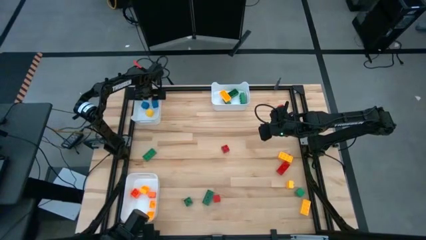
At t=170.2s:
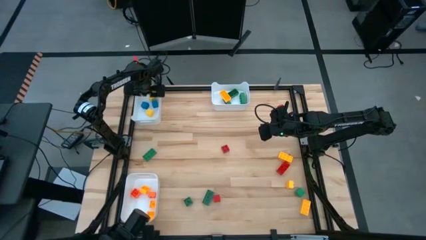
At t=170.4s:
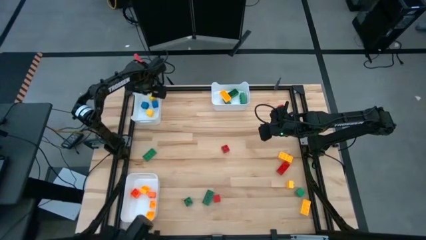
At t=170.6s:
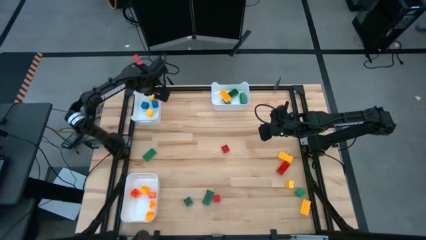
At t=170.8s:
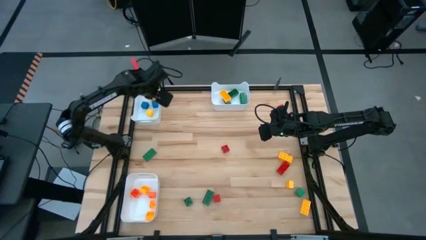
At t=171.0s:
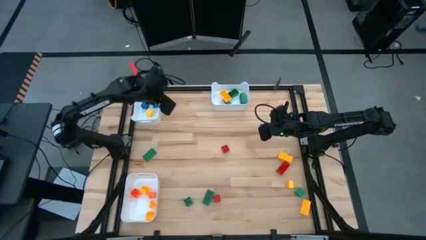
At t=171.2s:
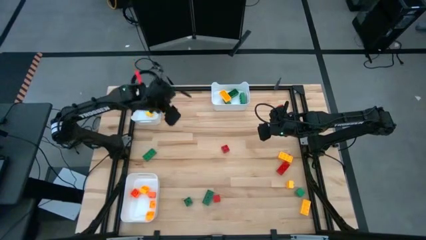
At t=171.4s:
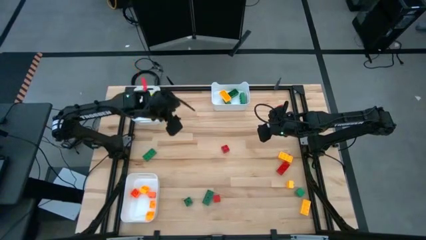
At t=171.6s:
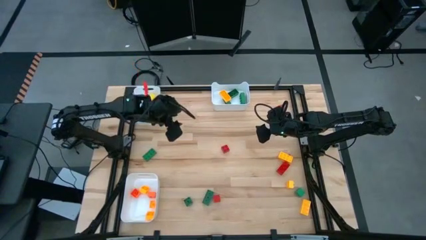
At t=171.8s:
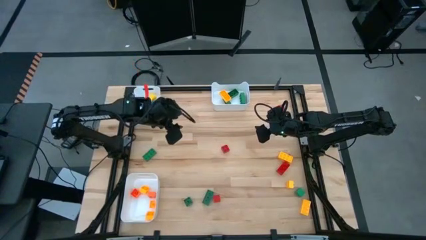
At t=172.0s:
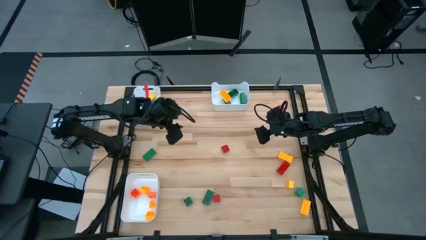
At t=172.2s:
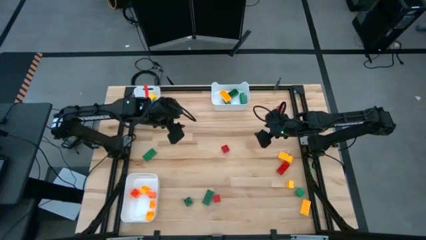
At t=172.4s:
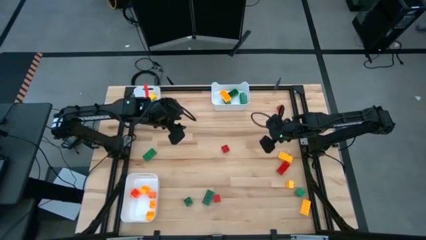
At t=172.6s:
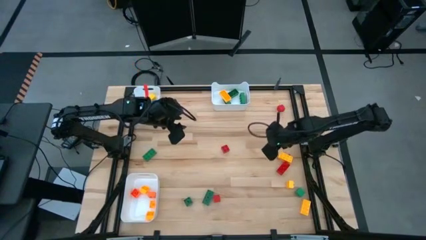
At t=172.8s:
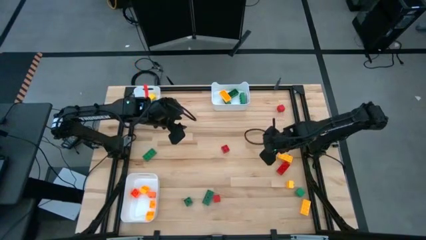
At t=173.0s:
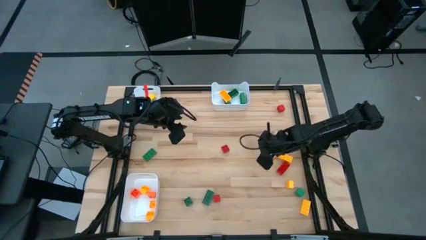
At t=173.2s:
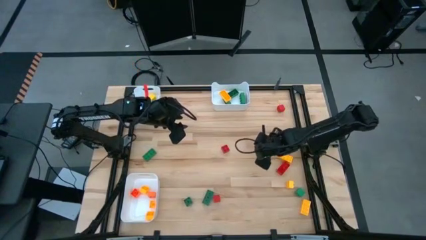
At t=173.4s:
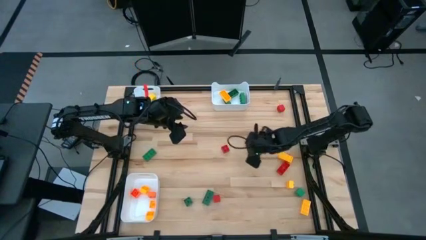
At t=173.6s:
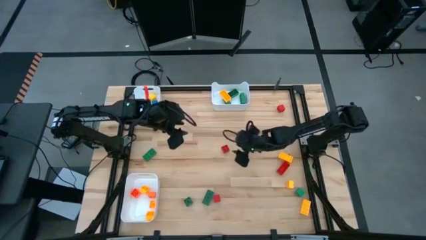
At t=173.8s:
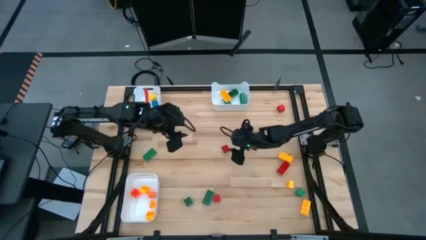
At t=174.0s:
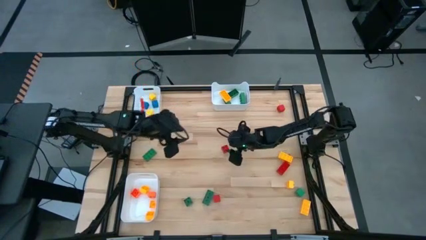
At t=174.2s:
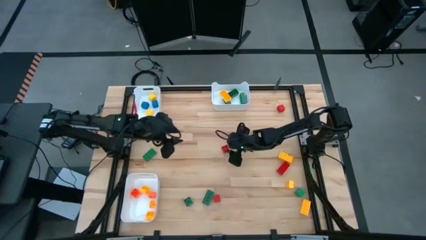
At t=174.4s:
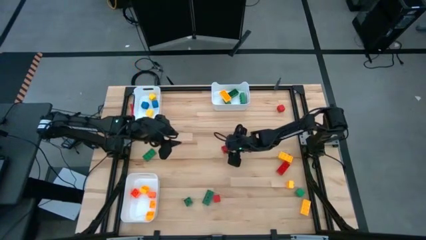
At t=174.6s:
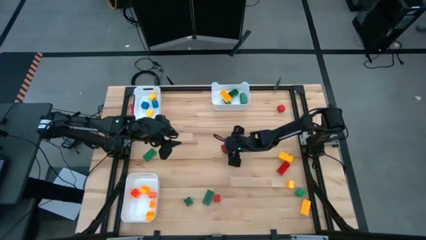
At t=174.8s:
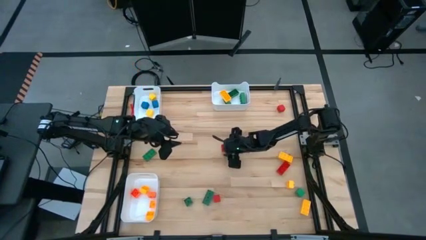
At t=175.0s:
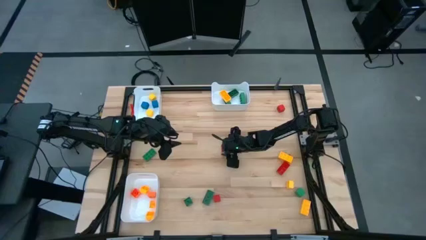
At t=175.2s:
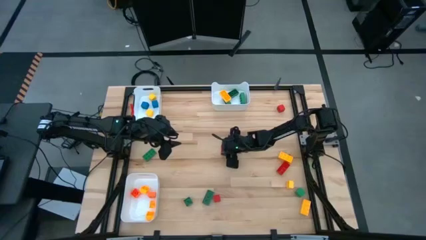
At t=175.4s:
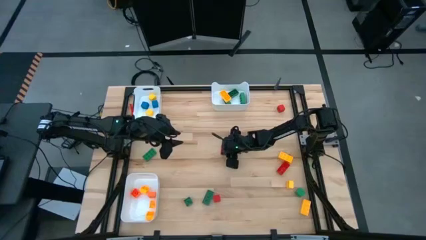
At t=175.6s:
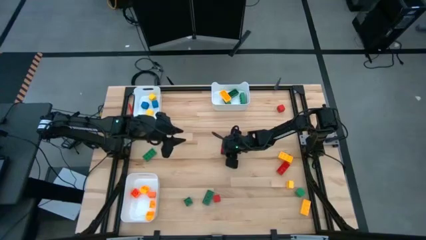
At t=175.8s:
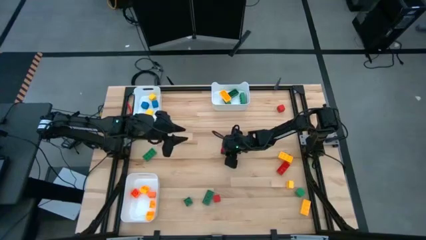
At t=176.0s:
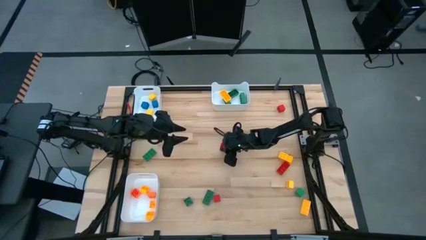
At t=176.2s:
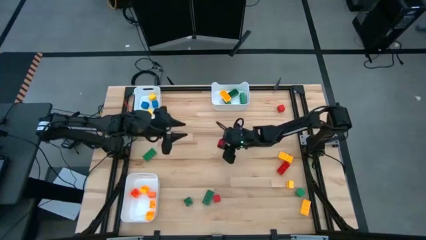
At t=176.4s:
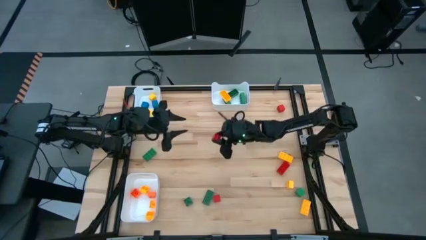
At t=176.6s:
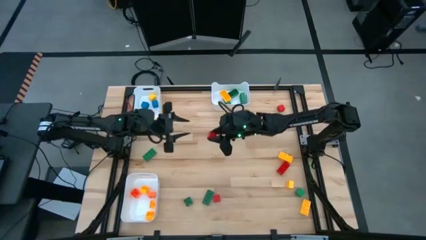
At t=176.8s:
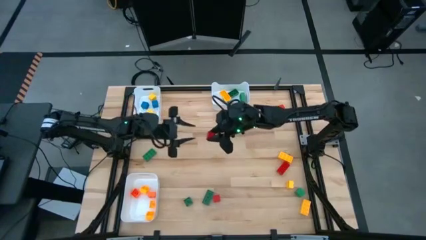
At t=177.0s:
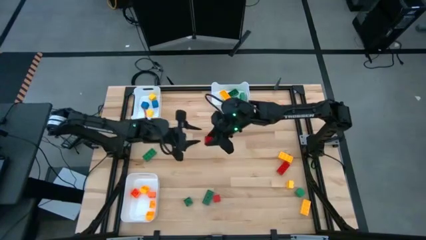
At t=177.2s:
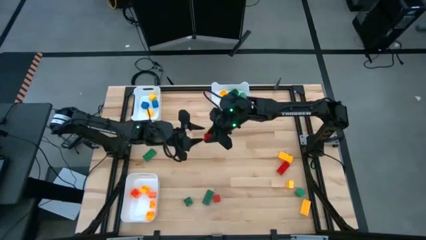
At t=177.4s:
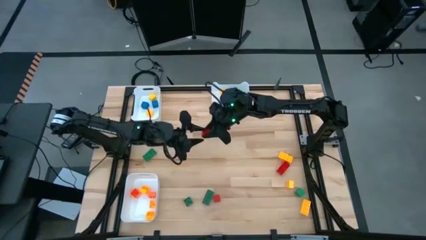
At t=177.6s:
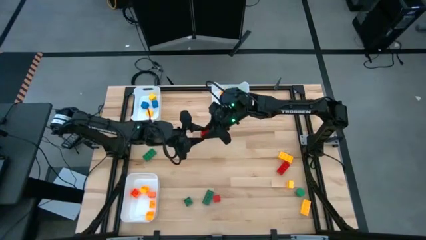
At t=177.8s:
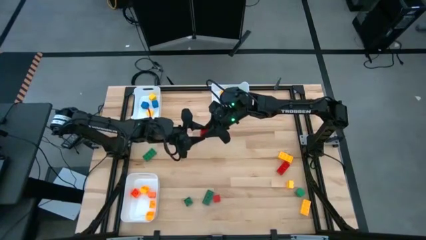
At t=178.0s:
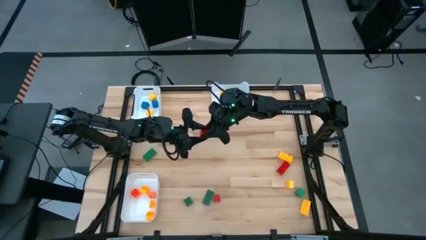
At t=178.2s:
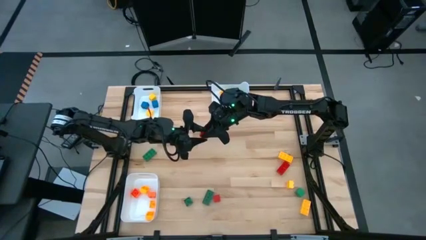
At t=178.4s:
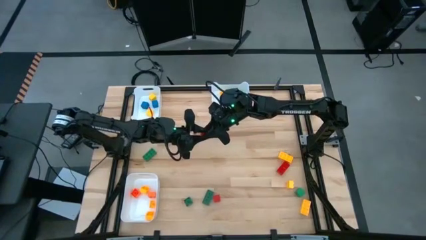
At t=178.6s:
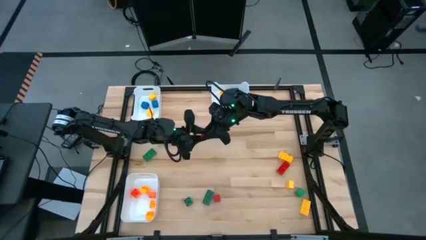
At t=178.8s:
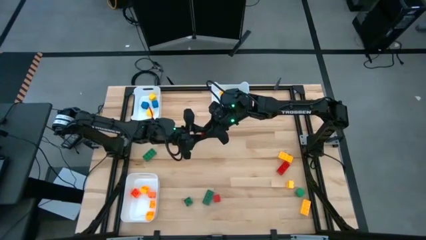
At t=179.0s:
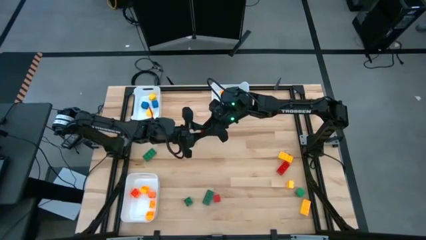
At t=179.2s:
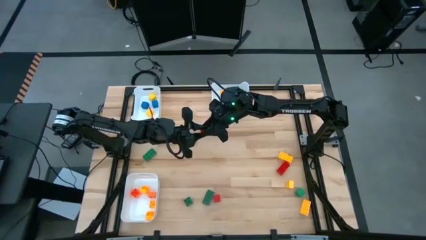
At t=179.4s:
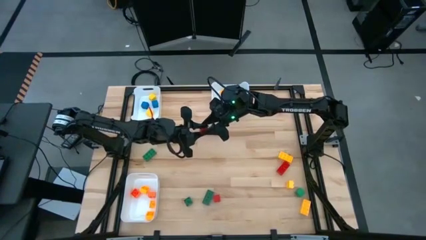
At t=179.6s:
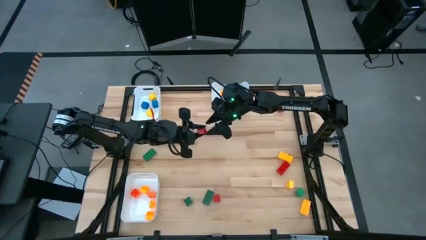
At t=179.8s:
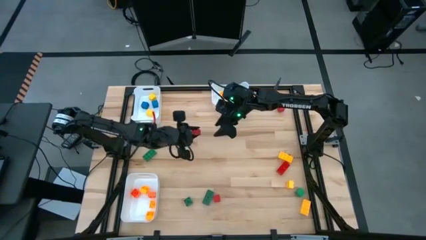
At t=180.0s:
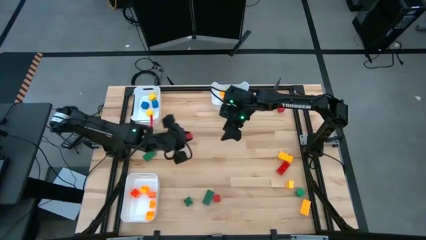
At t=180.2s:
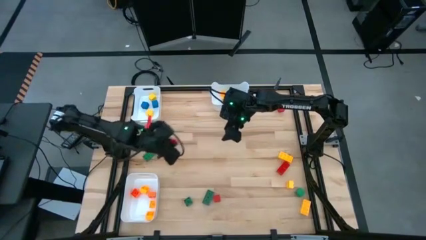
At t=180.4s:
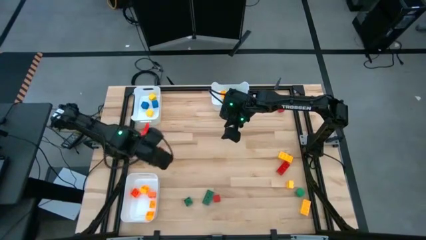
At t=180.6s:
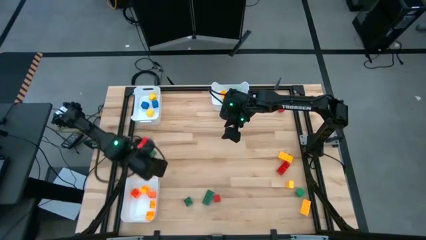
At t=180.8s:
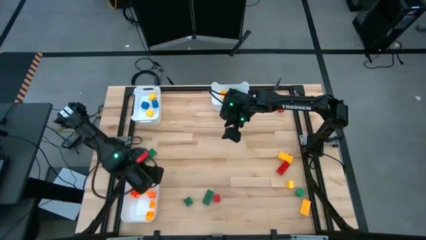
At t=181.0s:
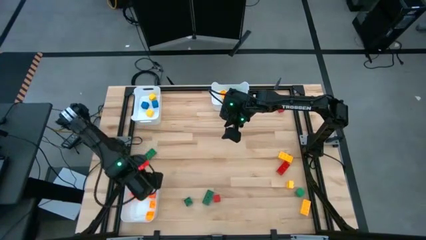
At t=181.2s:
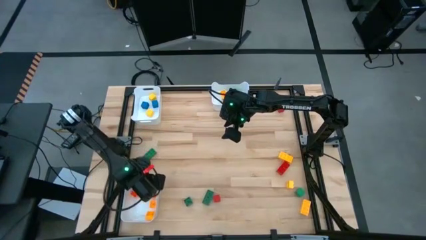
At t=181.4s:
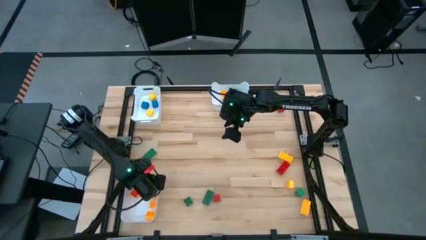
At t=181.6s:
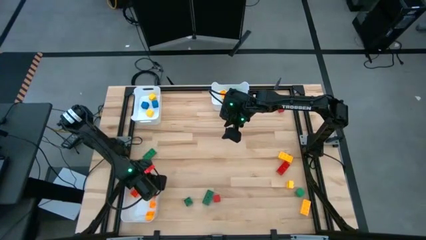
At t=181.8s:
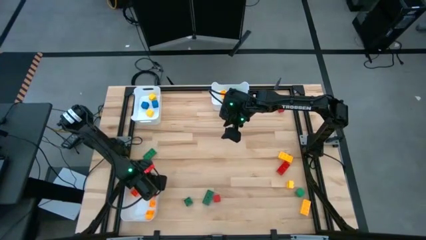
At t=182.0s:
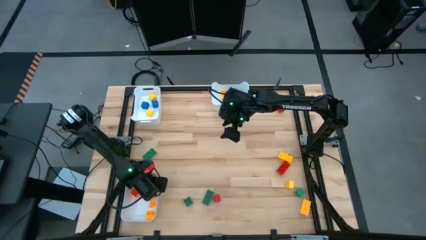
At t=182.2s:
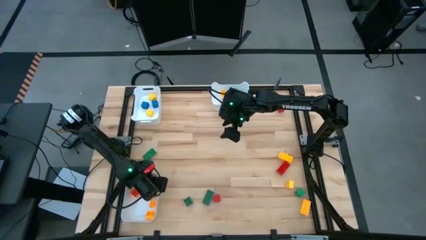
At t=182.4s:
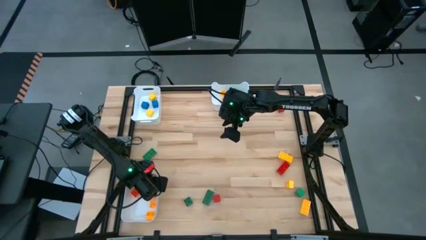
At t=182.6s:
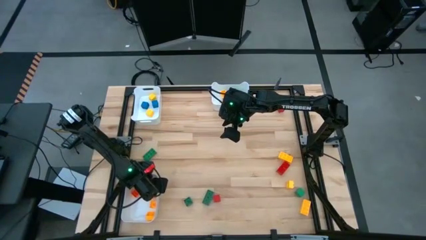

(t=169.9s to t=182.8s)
Task: Sort blocks by size
Put the red 4 stud game piece into the bottom white bin

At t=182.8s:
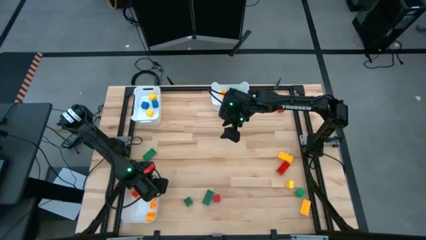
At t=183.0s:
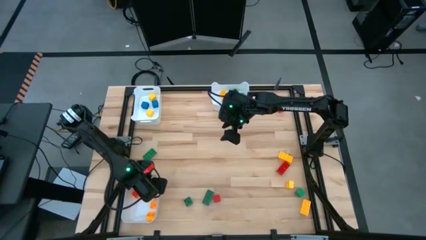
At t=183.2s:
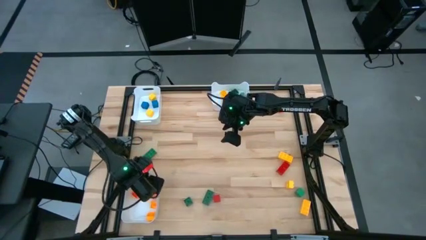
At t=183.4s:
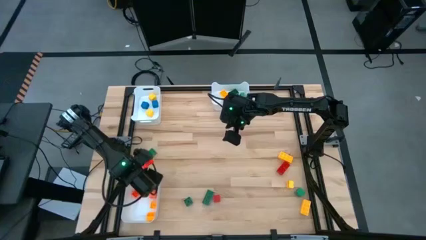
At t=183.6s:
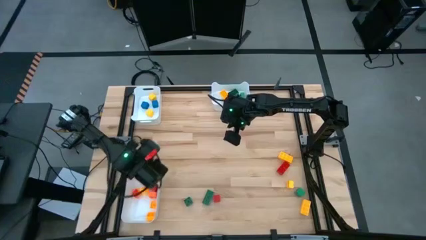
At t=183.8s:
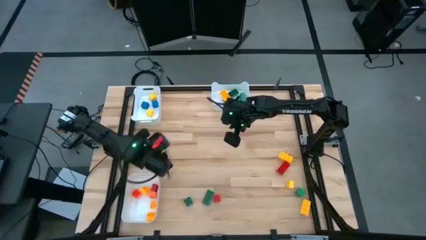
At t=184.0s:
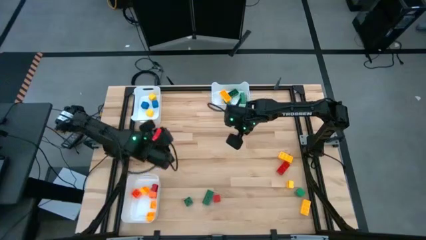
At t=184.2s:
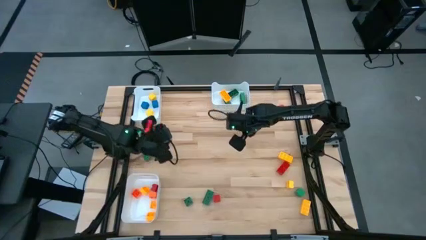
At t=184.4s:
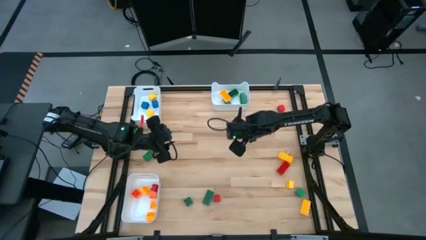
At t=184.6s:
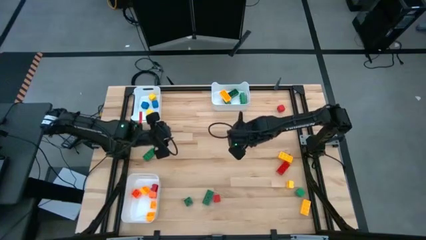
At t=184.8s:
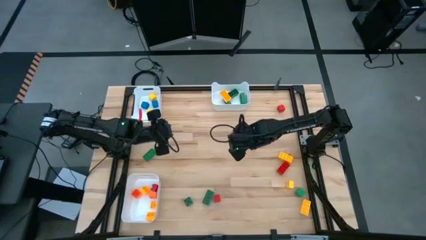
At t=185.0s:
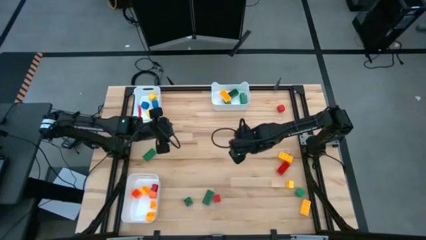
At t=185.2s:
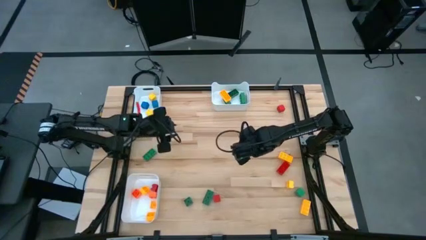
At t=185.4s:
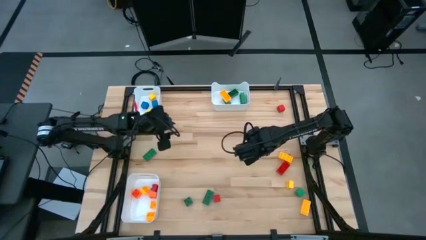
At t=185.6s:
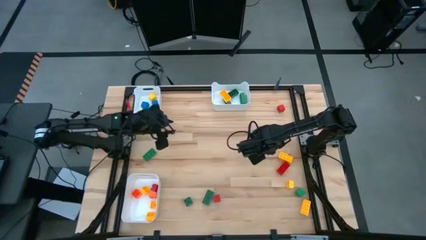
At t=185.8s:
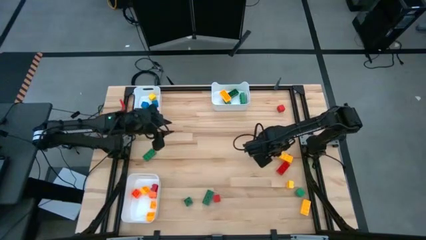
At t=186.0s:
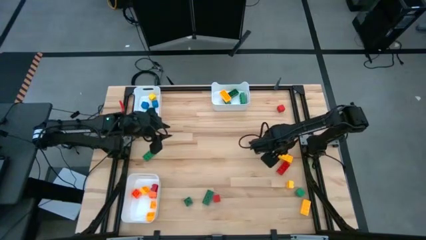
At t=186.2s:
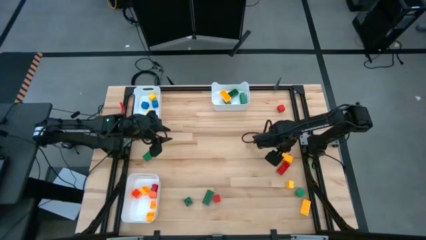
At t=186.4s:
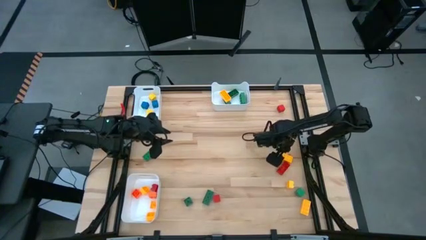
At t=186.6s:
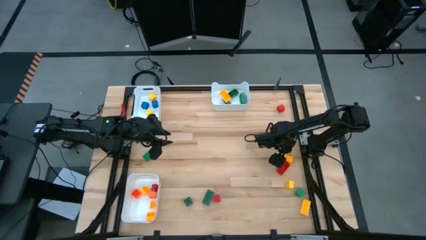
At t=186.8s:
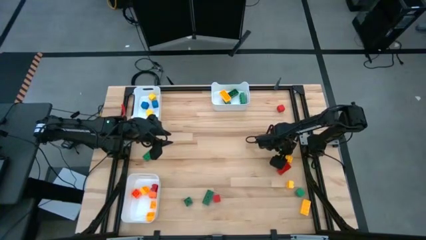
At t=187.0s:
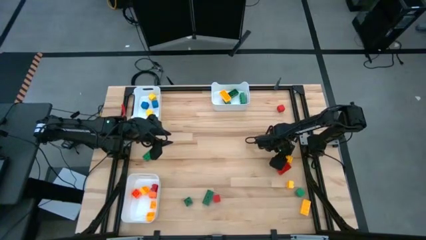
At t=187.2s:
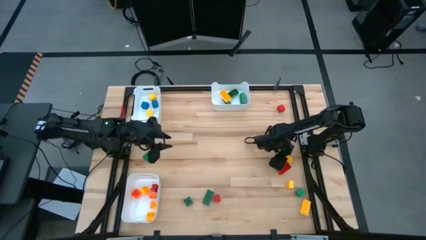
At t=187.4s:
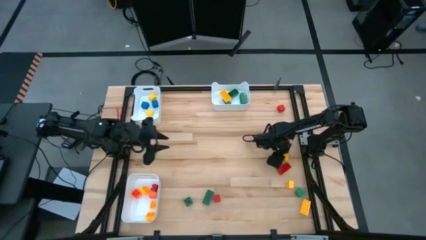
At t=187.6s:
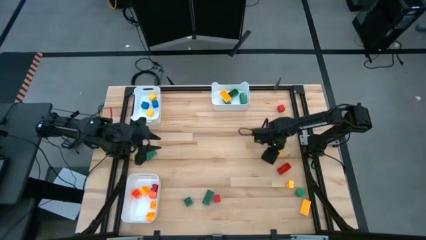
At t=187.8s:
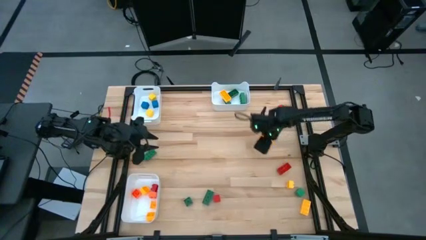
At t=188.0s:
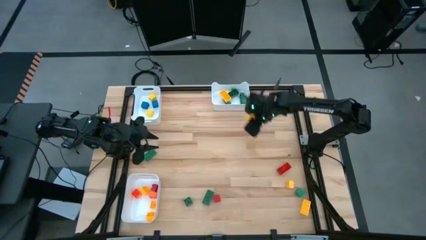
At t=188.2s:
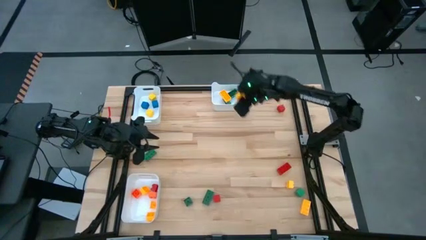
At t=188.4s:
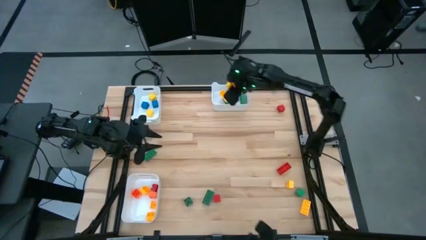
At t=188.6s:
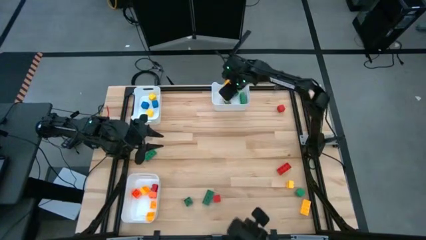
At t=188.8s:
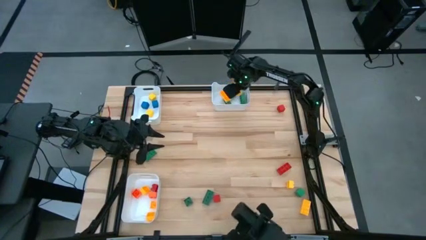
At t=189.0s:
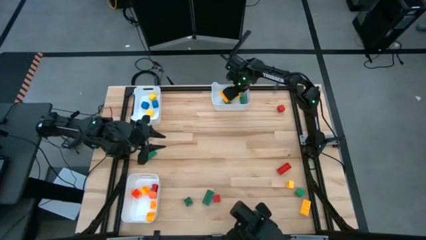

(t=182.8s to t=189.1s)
Put the yellow 8 stud game piece into the top right white bin
